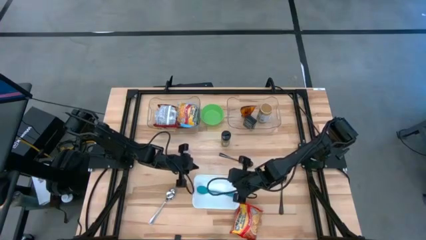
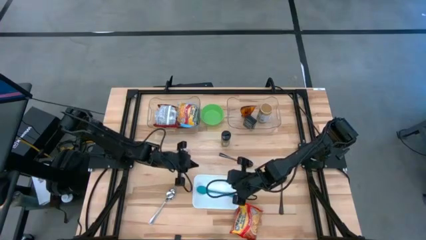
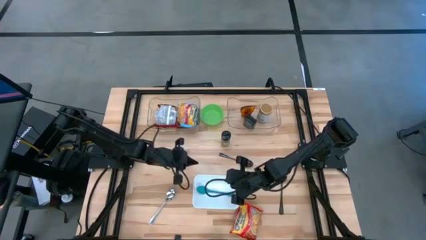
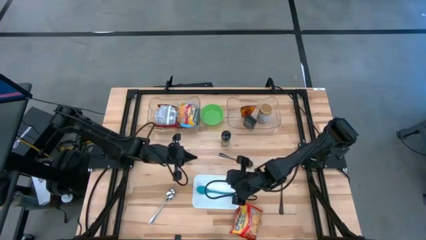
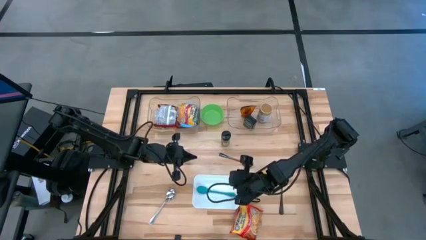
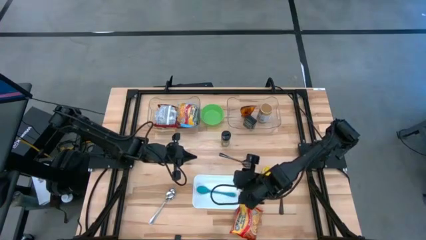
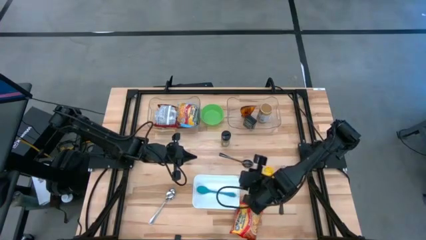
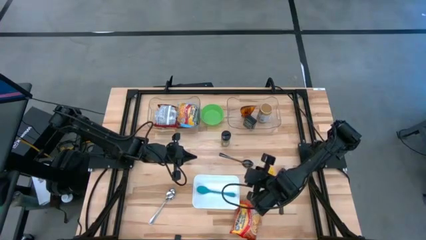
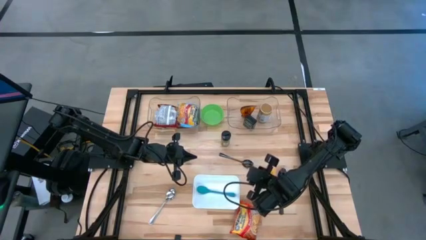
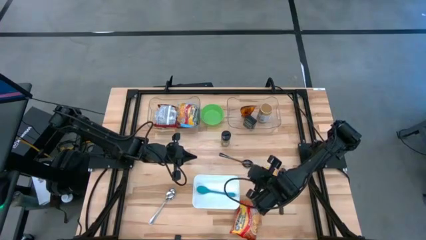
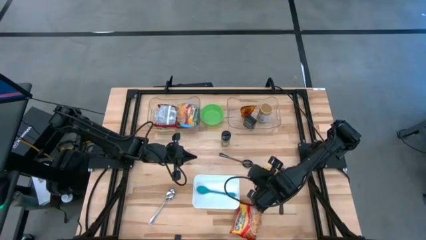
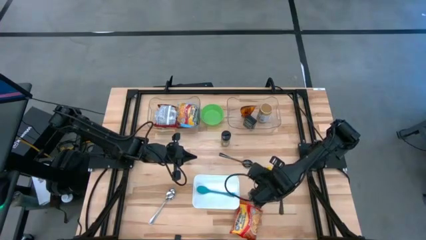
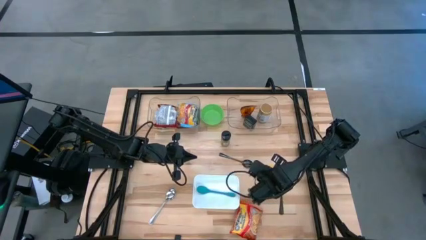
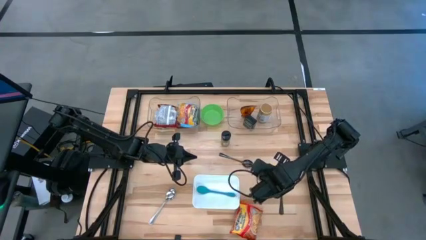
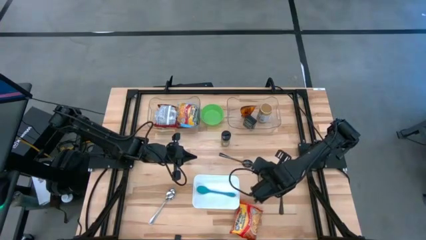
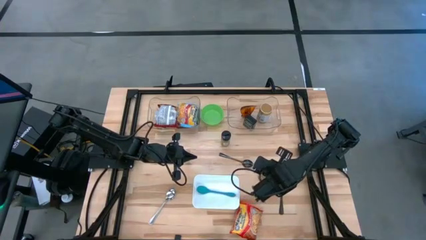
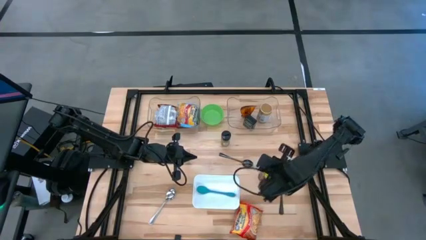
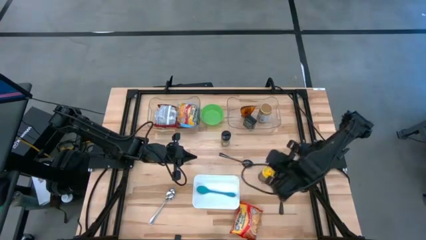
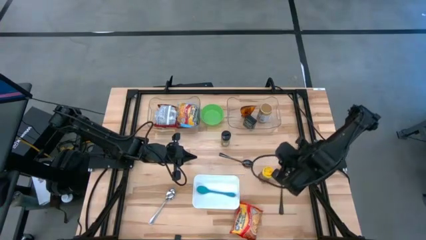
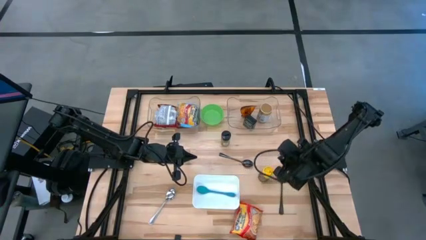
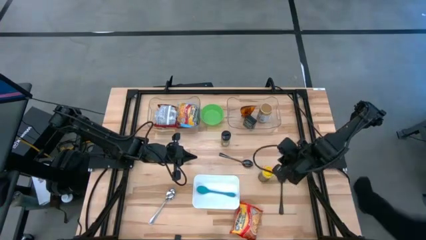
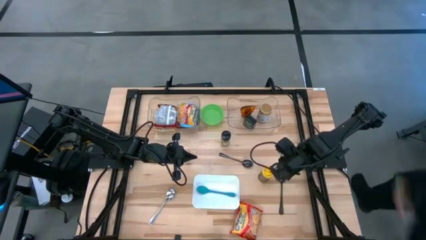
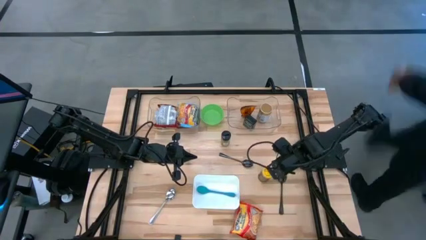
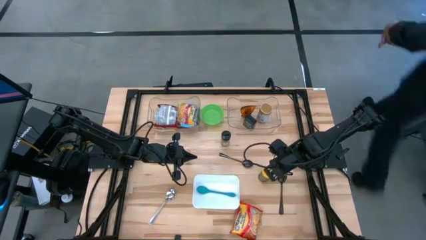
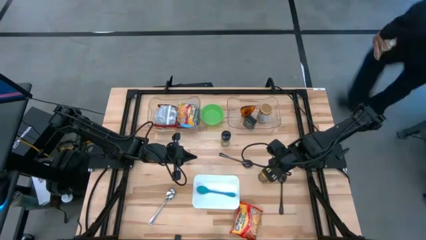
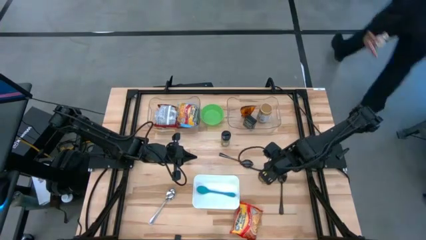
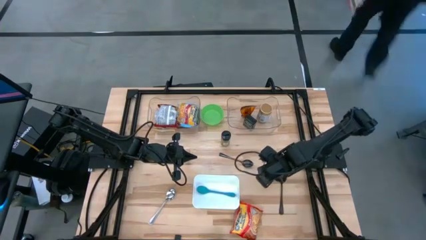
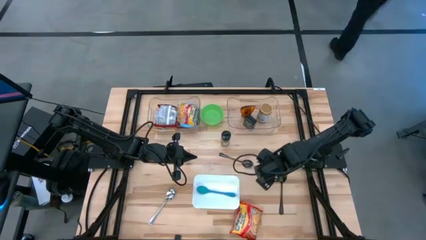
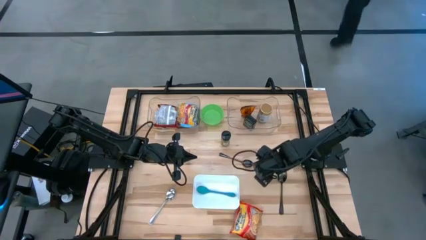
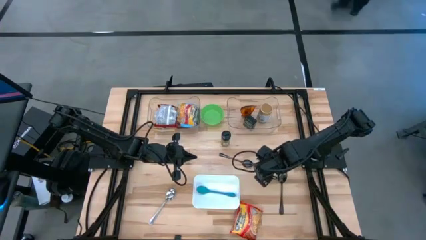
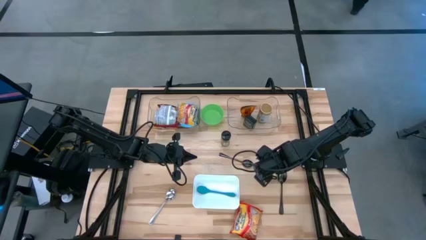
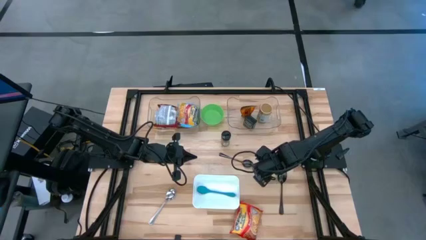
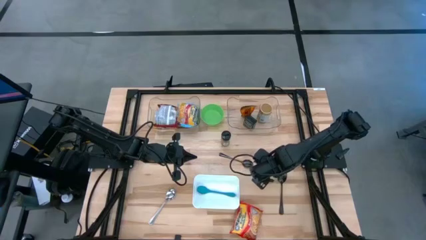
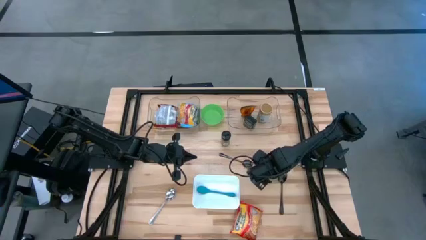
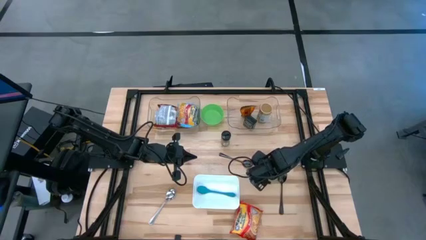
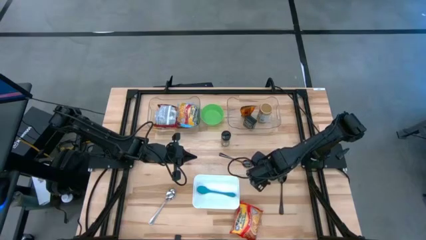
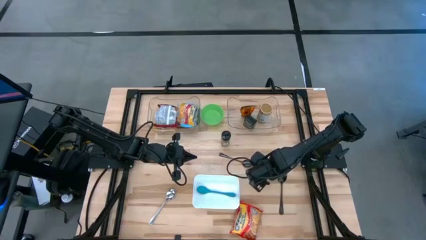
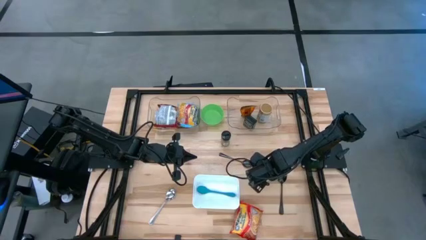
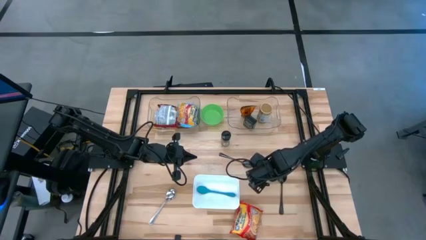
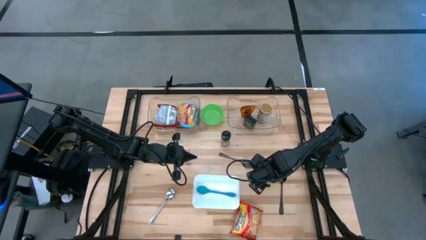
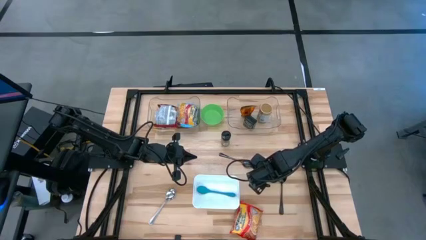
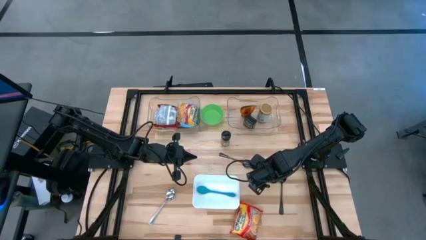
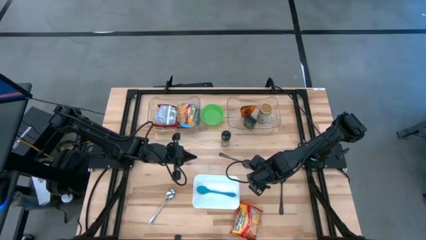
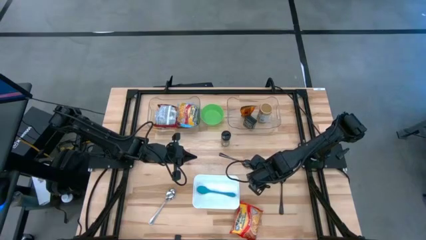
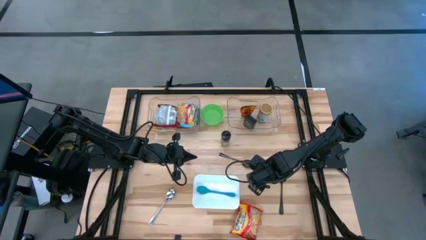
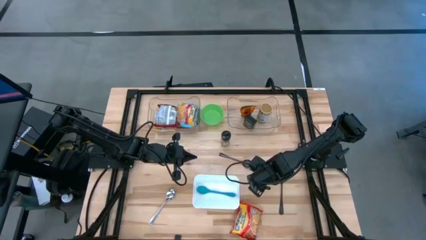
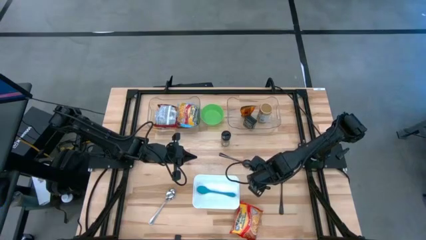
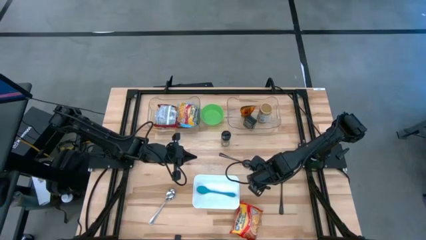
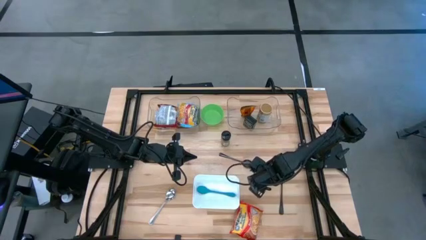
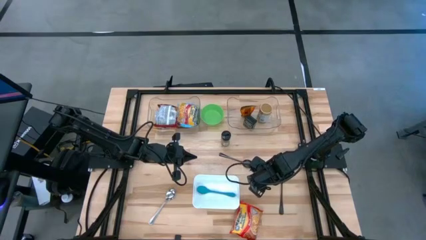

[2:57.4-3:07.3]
Task: Pick & Place Food Item
Put the yellow seasoning into the right transparent bin

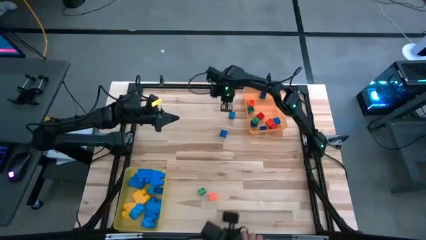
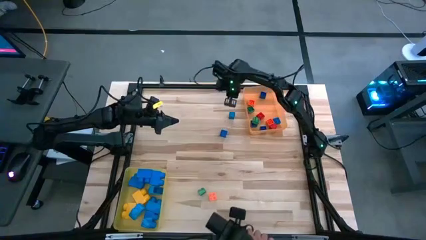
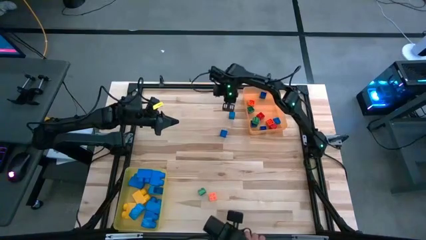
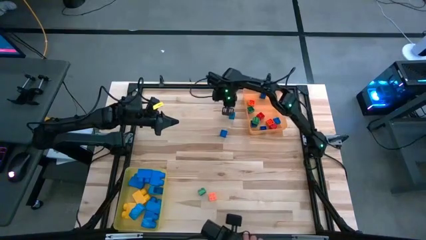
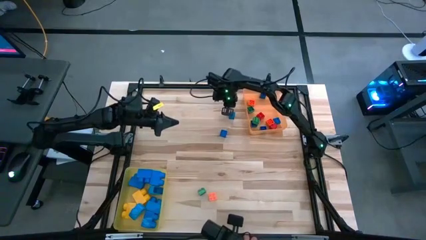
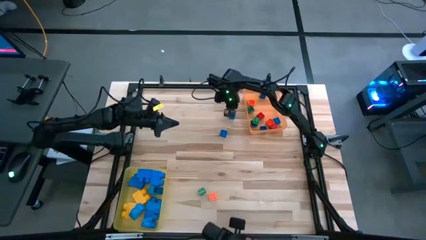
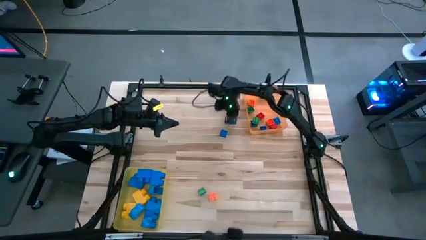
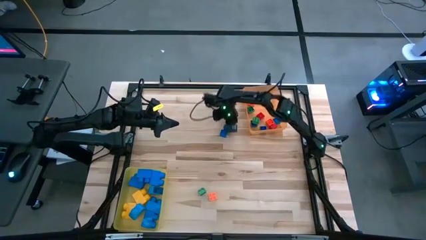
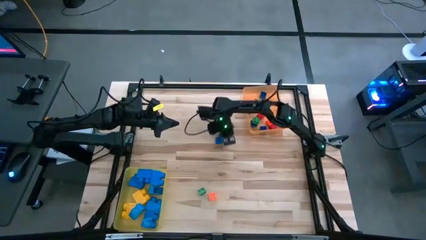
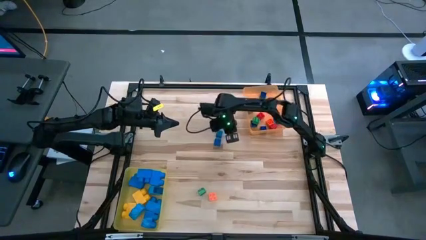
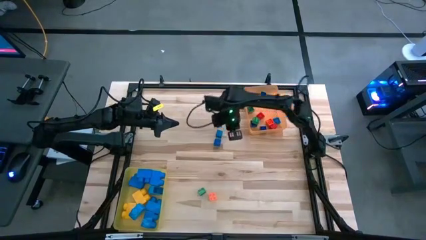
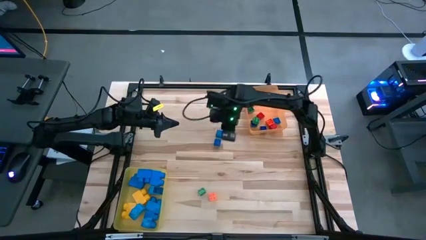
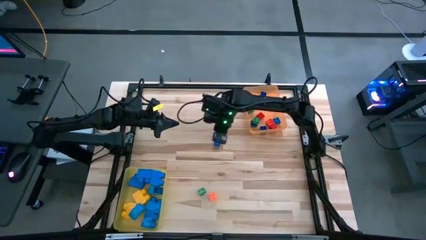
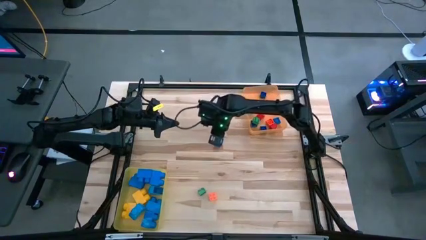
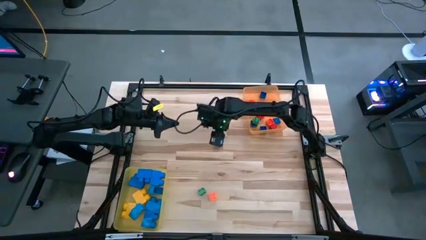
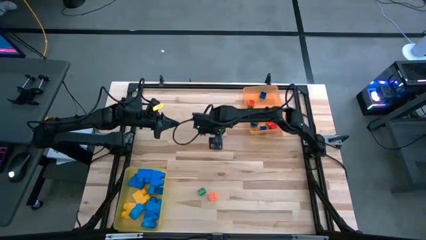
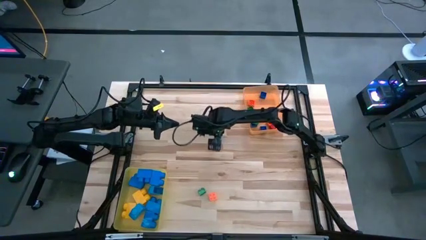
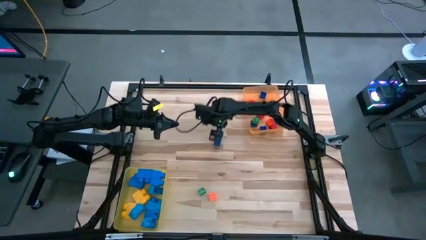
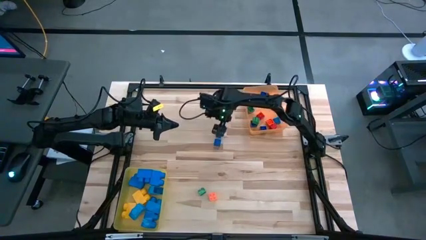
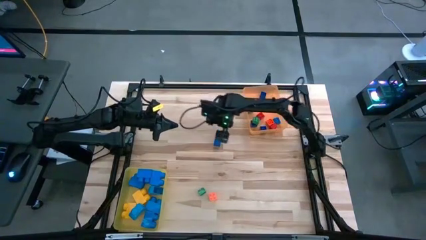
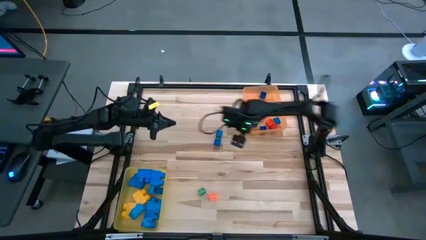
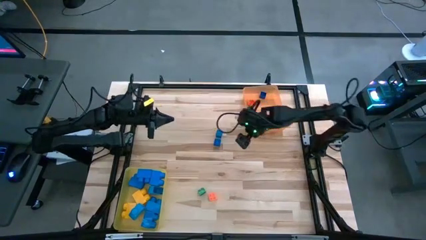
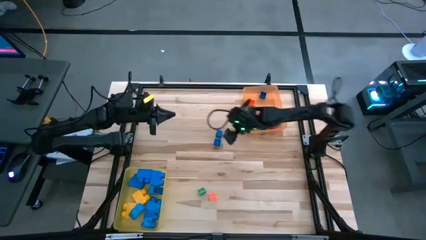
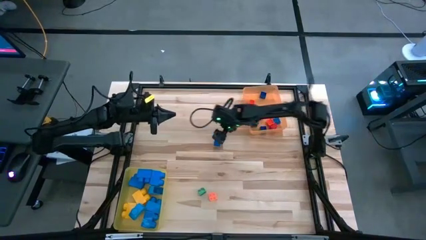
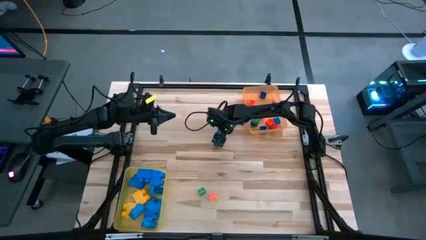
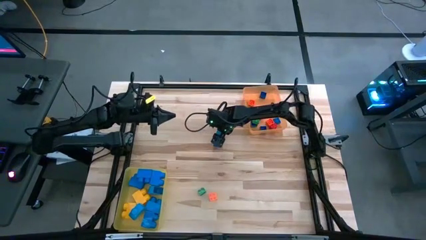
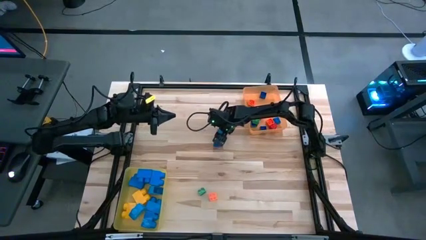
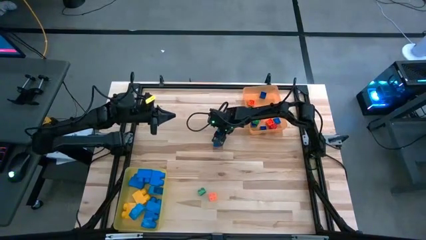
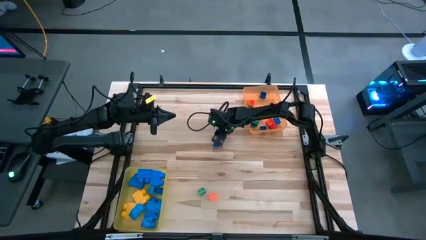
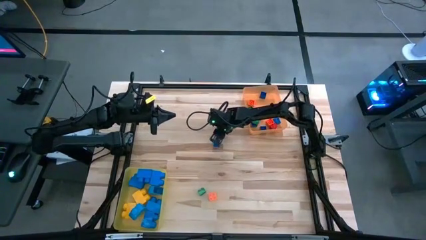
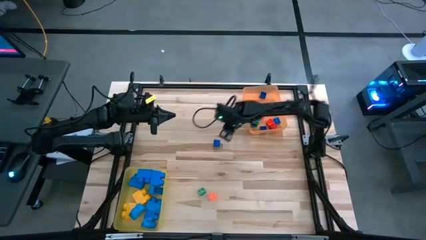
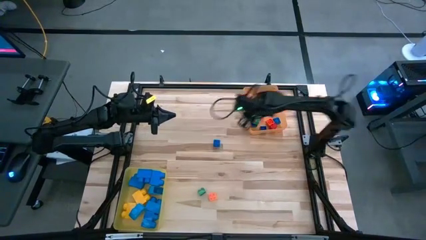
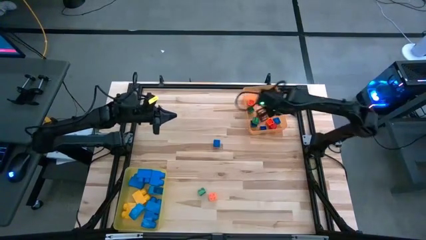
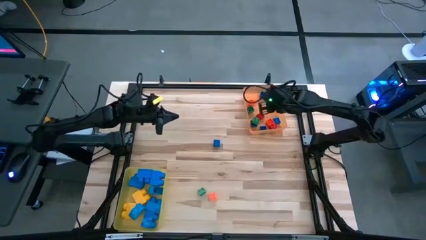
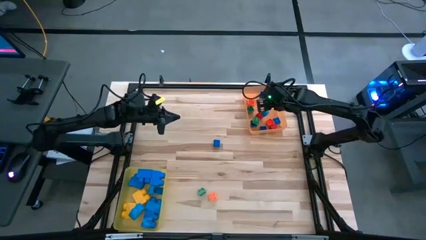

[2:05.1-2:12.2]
Task: Sort blocks by size
Put the small blue wooden block into the orange bin
